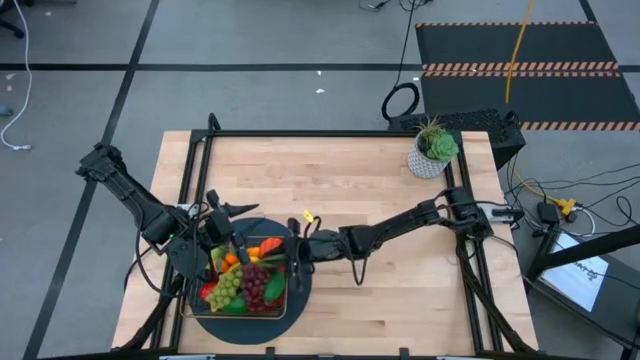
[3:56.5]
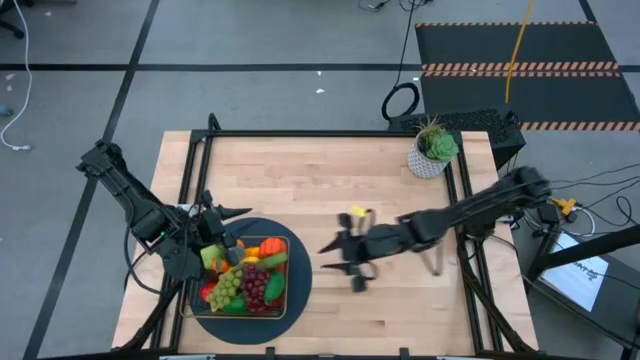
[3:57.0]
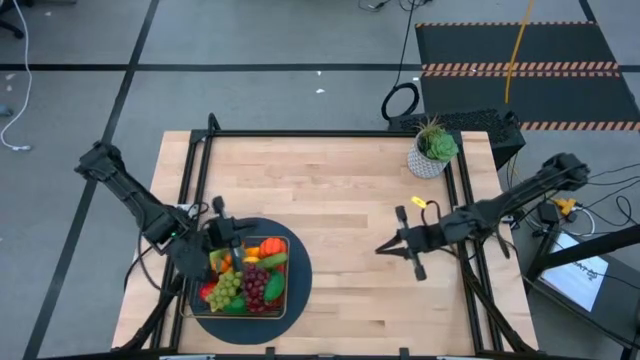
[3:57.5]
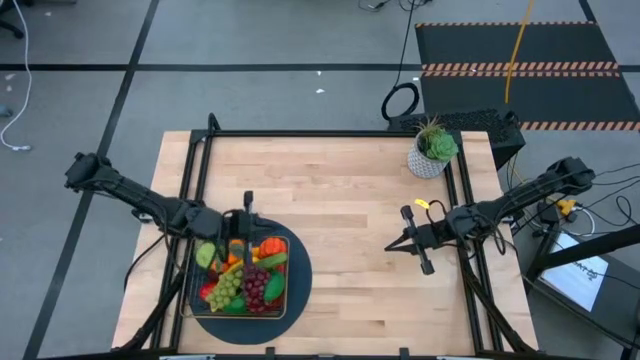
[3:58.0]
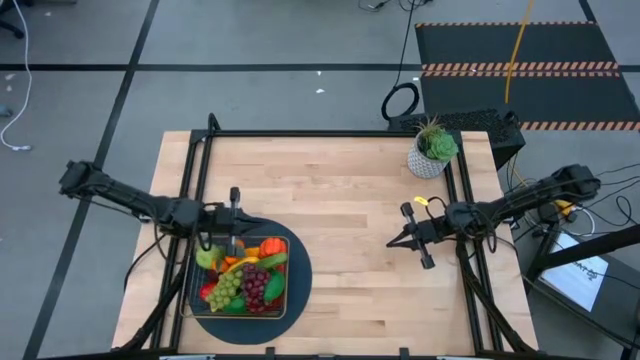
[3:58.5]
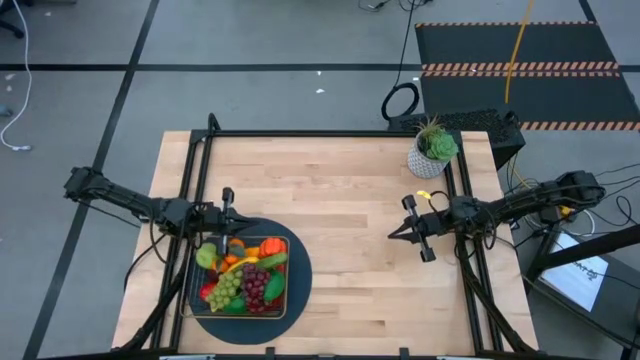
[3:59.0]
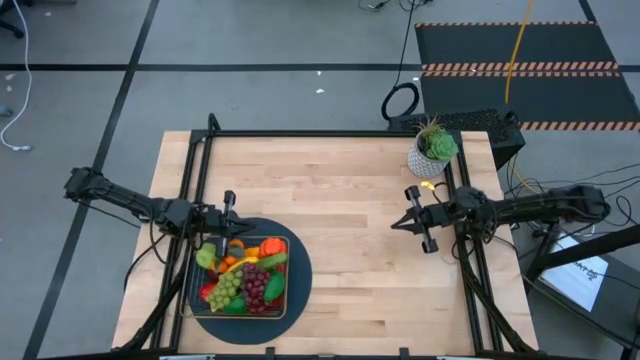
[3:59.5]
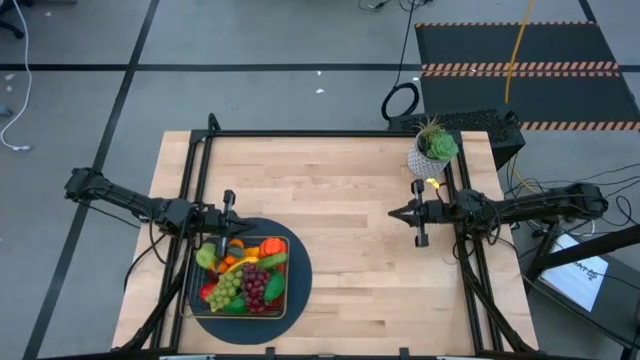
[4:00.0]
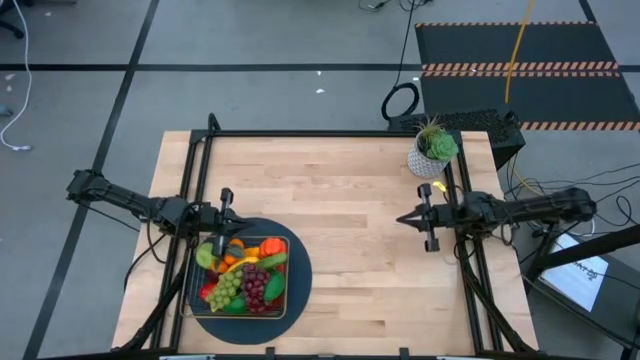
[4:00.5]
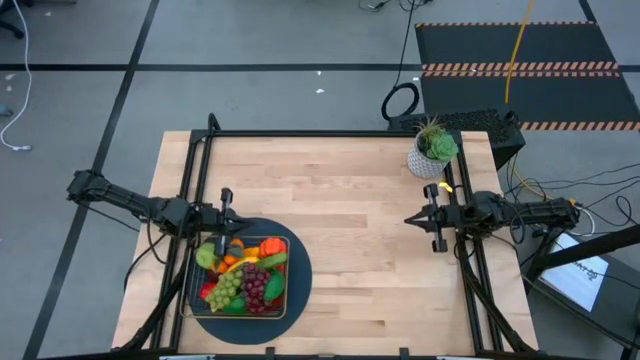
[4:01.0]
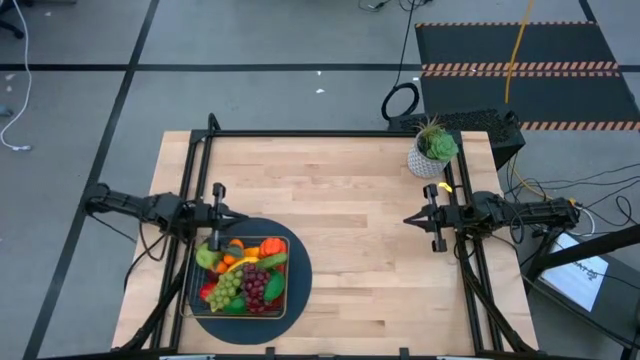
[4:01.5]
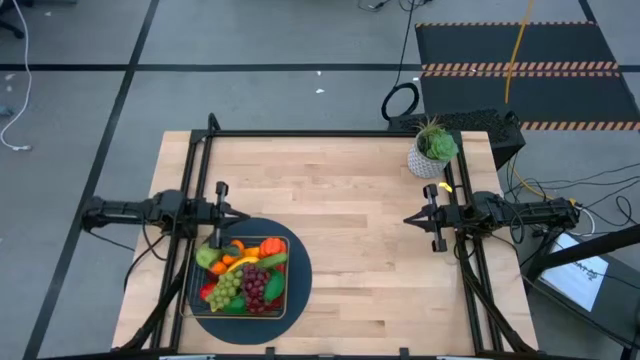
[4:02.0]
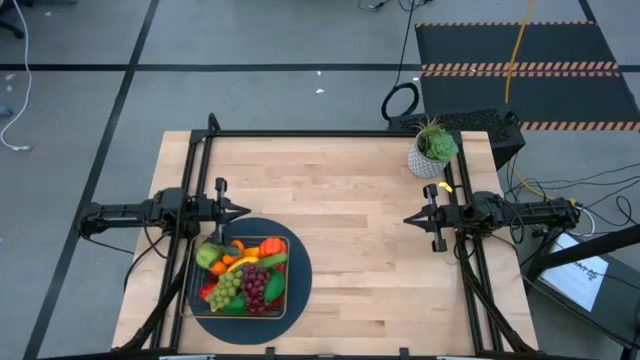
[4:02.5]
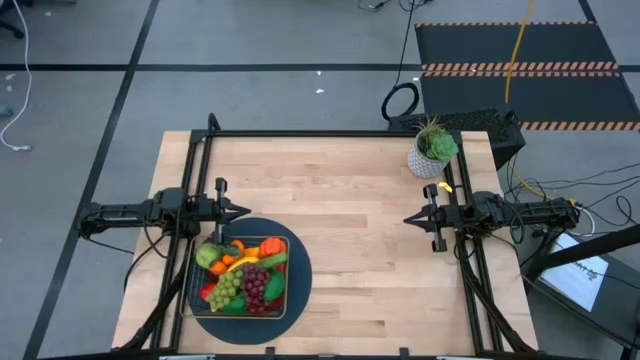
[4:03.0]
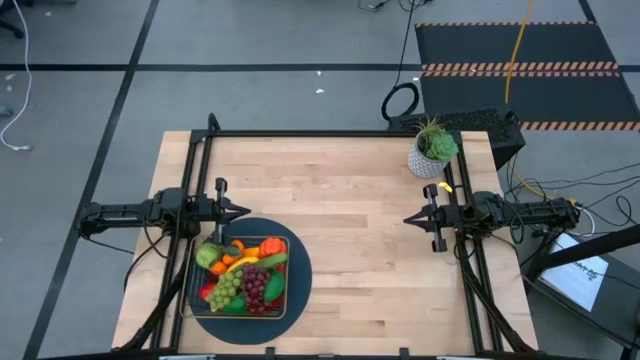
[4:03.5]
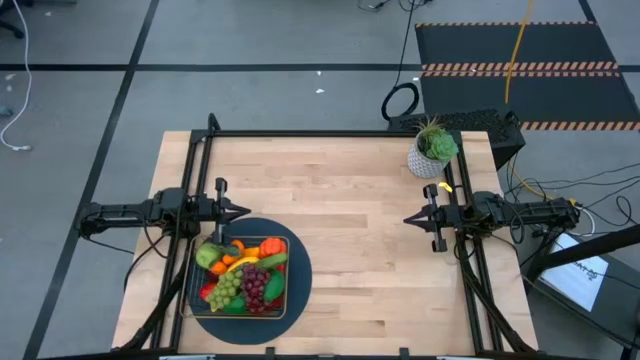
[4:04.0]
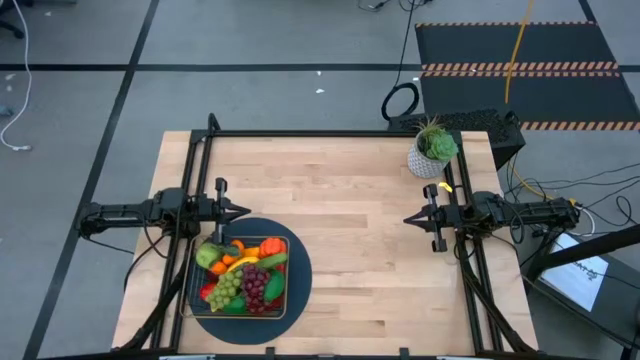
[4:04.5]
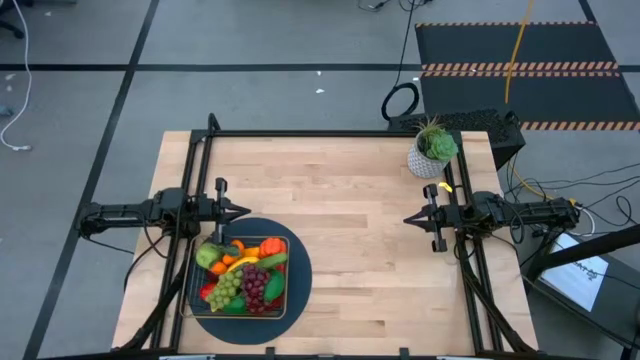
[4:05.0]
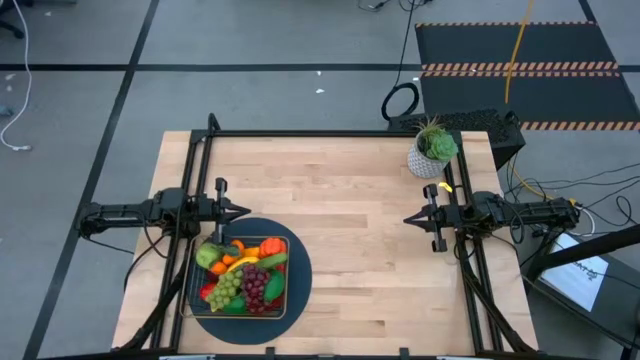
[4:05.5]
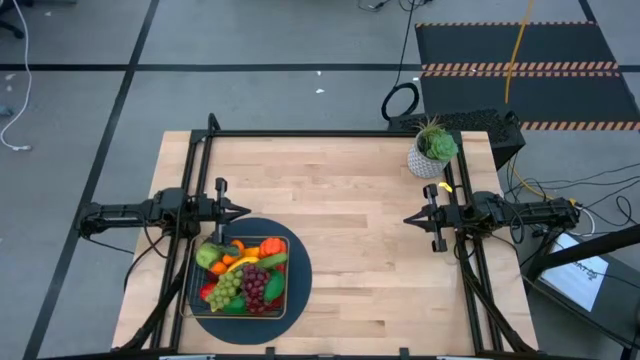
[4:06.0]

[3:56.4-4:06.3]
Task: Build produce basket
Return to Home Position

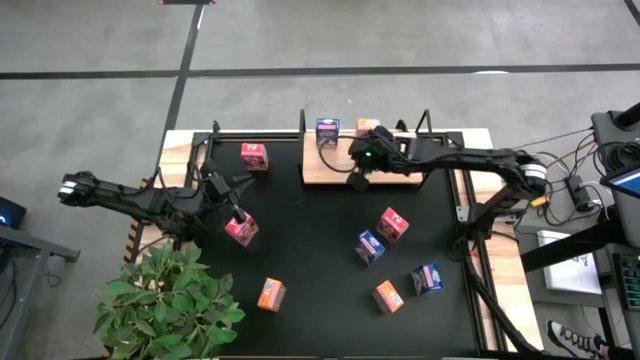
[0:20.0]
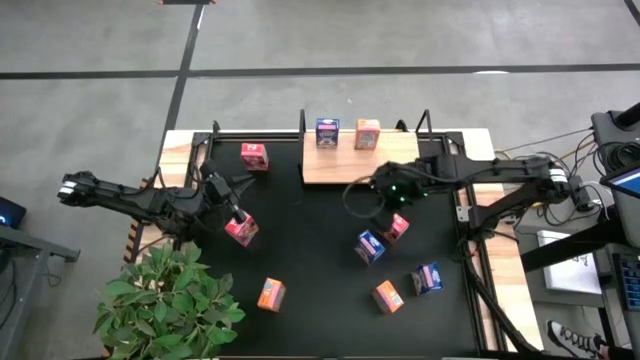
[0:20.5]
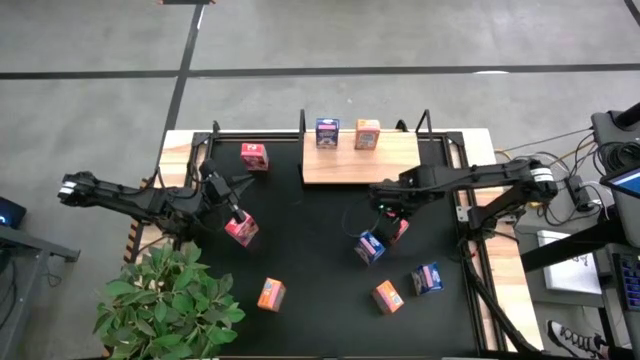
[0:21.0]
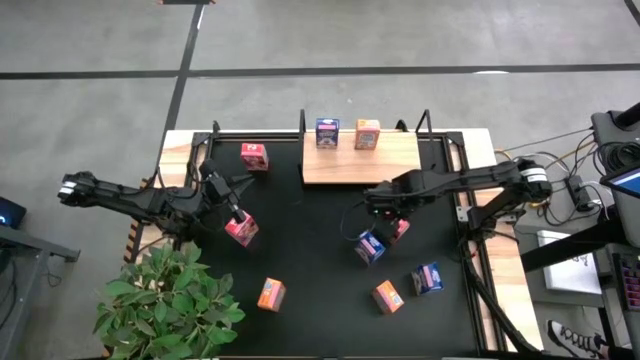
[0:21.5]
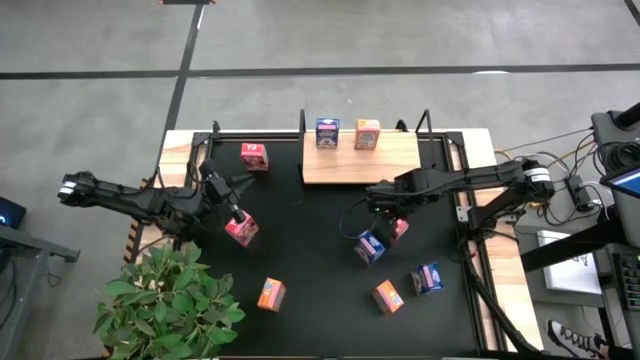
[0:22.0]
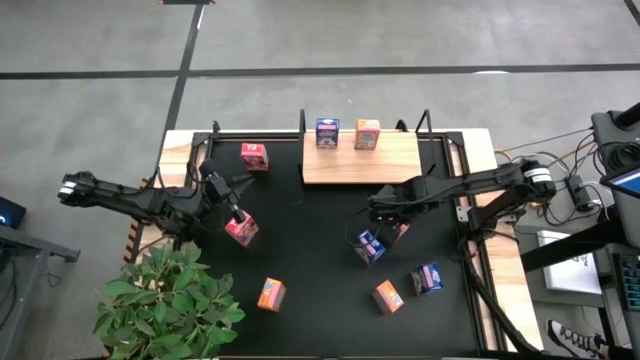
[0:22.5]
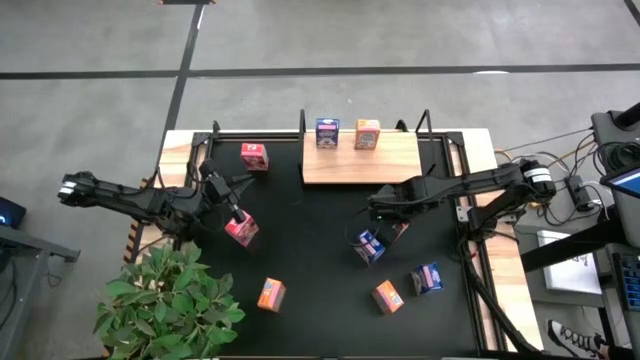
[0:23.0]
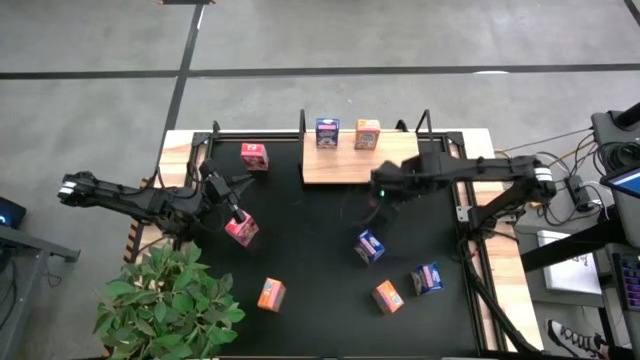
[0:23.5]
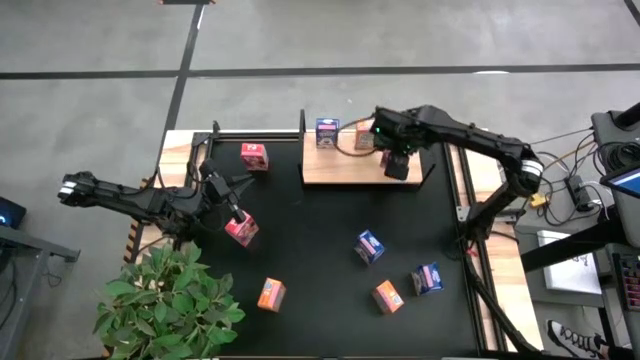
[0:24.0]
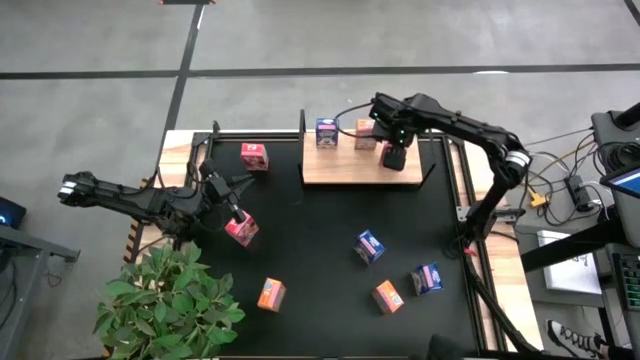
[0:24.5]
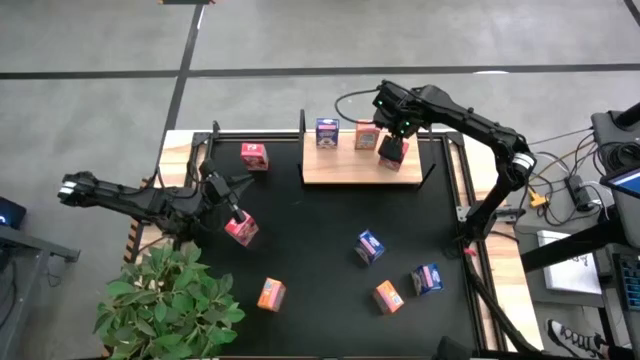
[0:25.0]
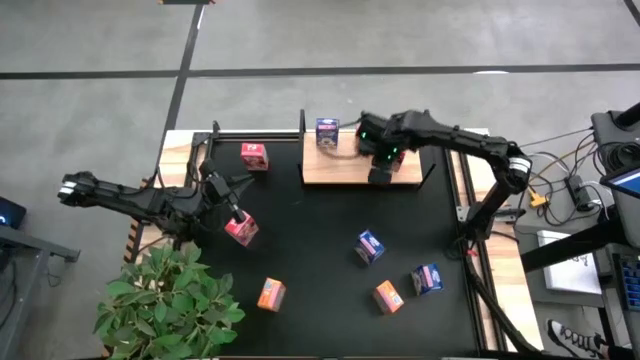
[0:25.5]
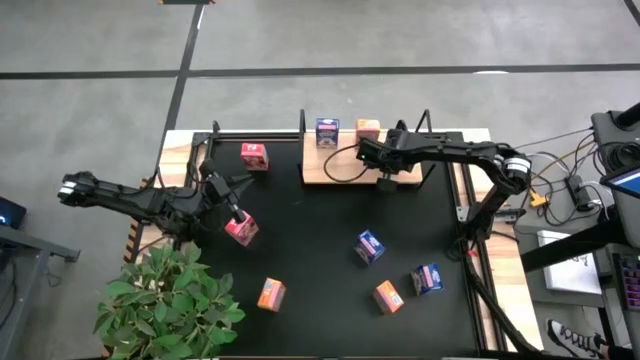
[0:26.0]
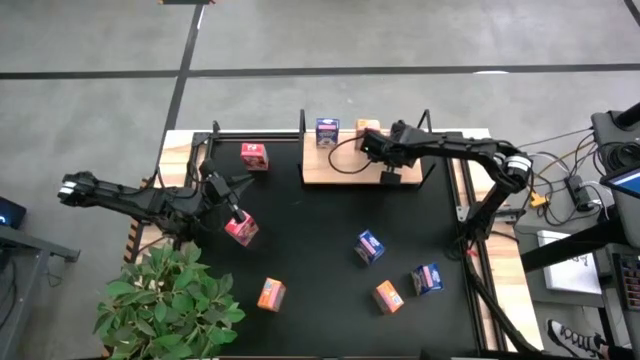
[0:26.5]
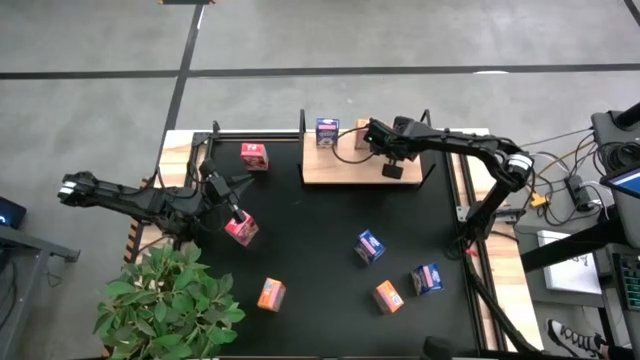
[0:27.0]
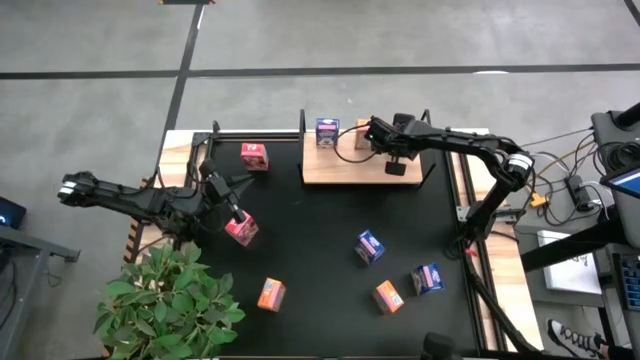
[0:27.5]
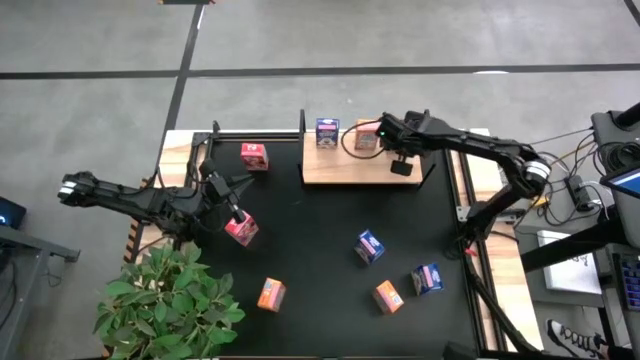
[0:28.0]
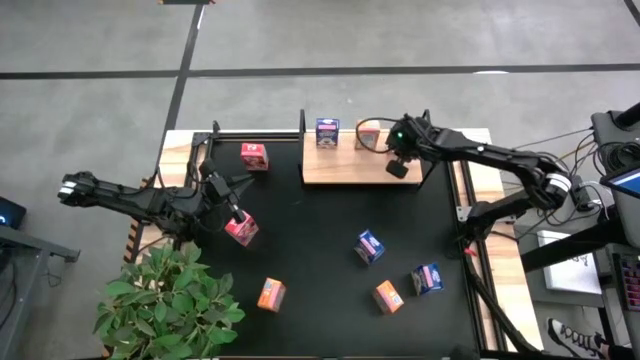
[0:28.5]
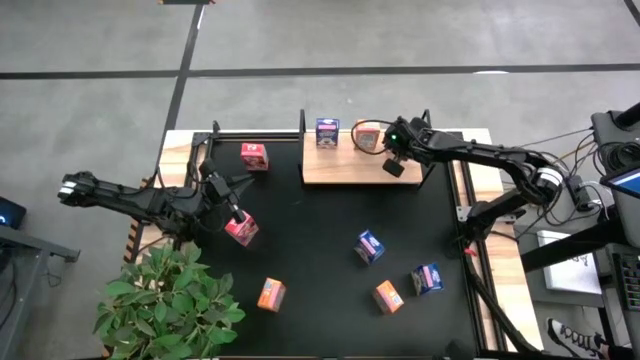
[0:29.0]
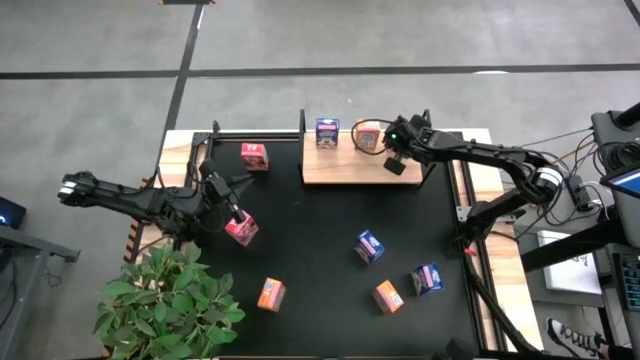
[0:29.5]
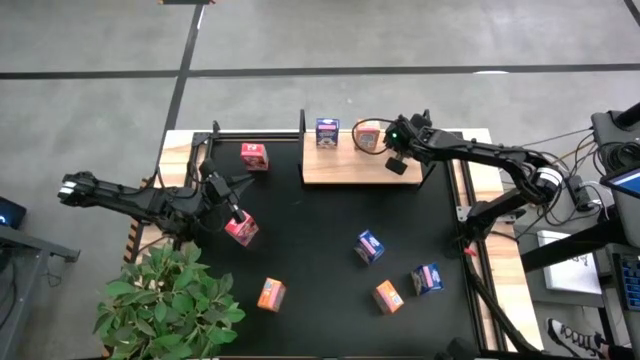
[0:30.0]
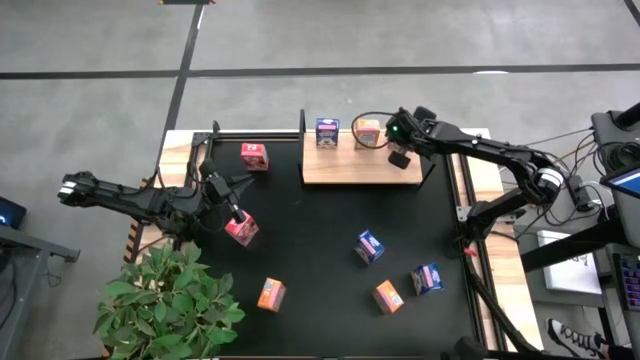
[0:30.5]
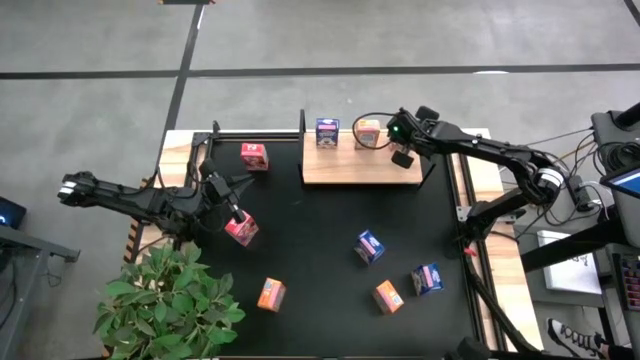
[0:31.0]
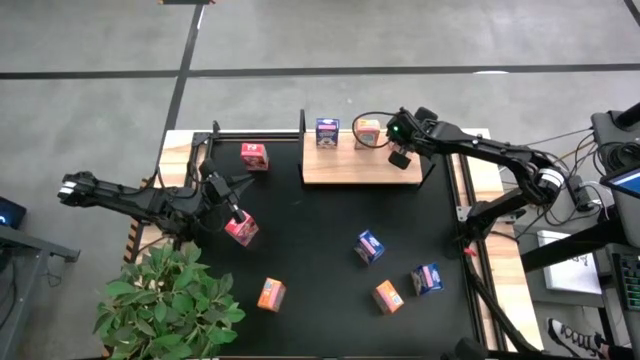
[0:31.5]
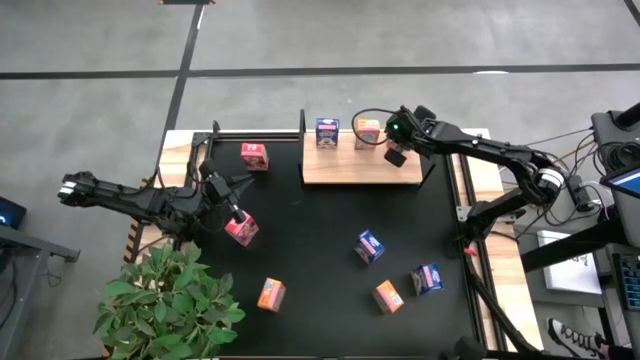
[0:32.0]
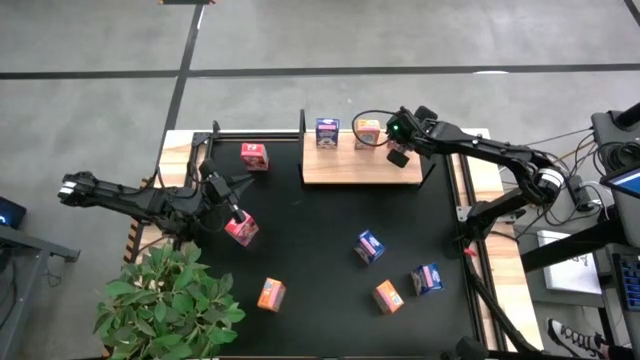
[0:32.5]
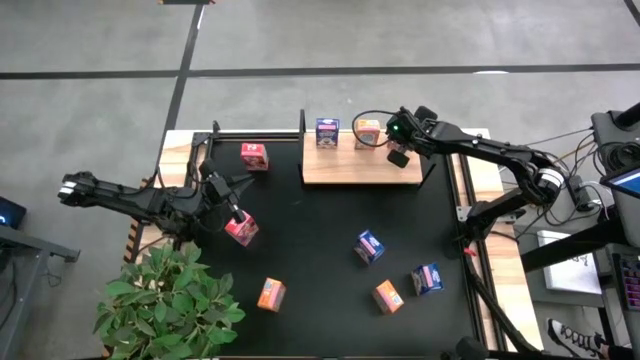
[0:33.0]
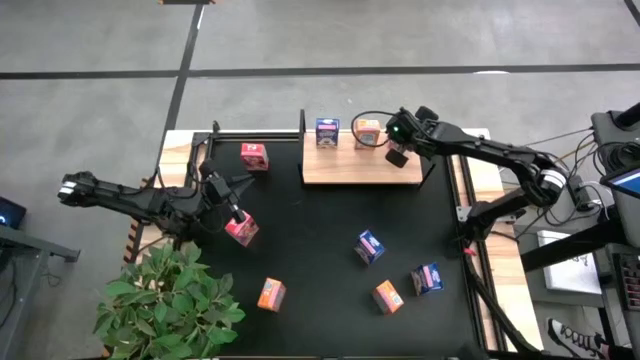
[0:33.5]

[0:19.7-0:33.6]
Task: Stack cereal on shelf
Put the bottom right red cereal box on the shelf
